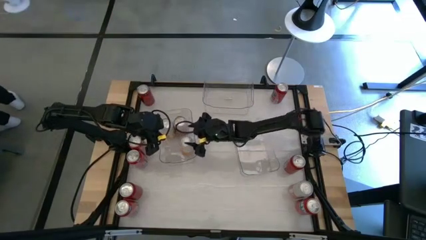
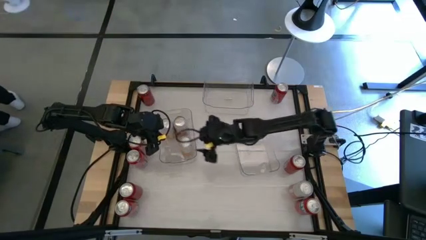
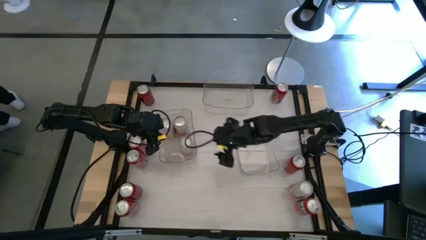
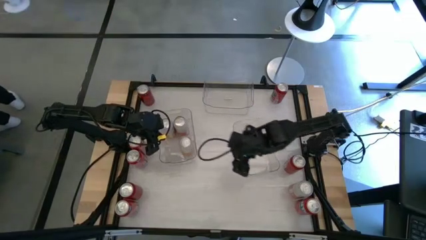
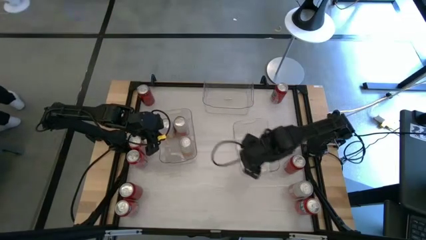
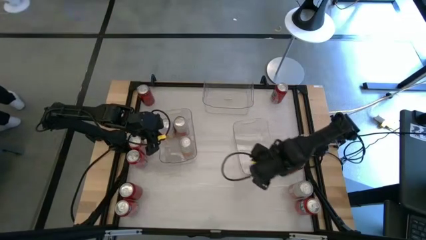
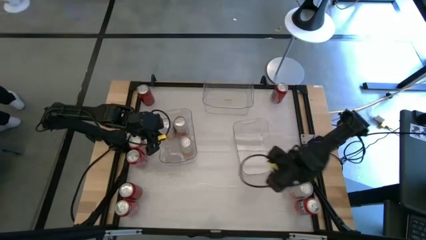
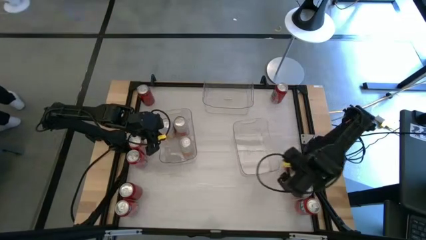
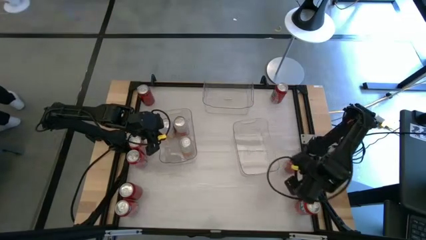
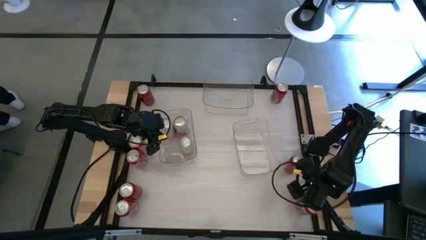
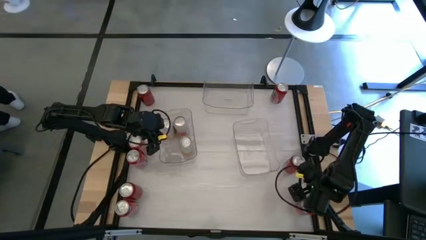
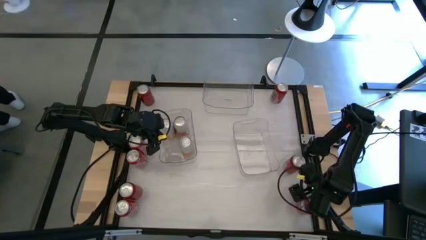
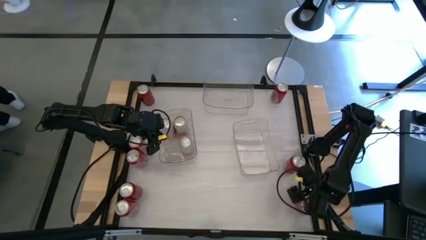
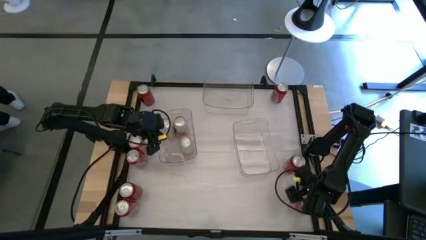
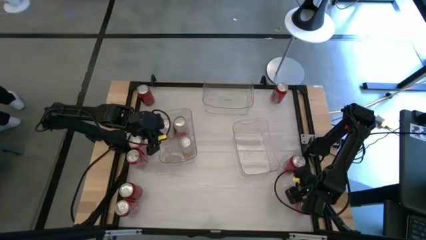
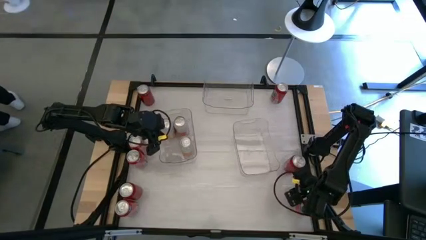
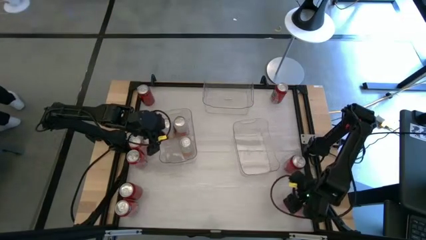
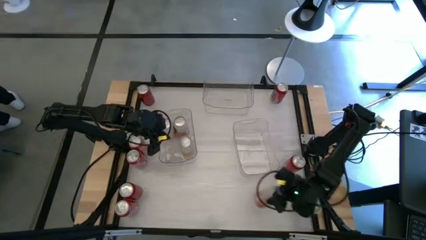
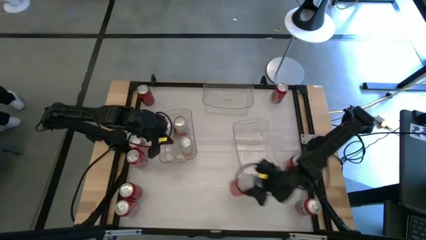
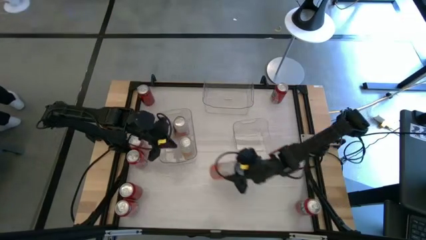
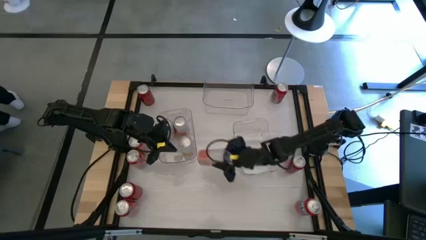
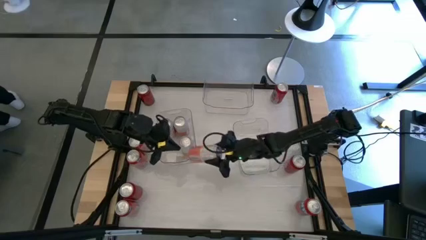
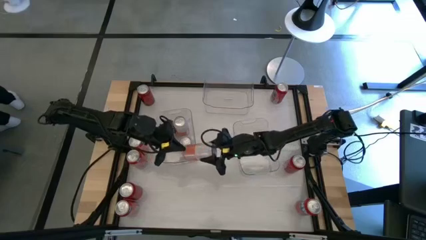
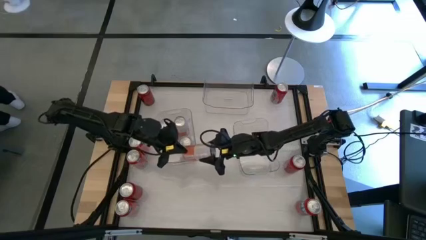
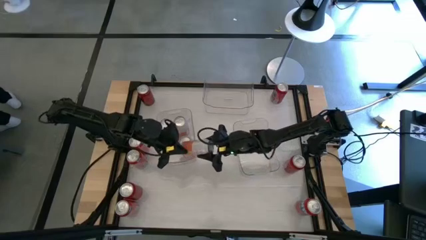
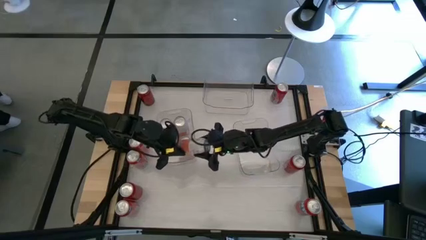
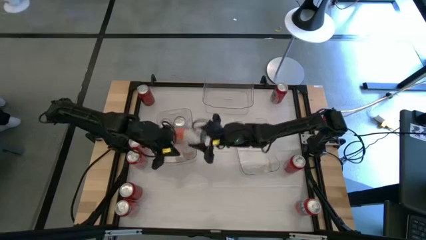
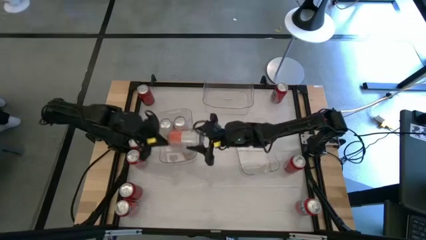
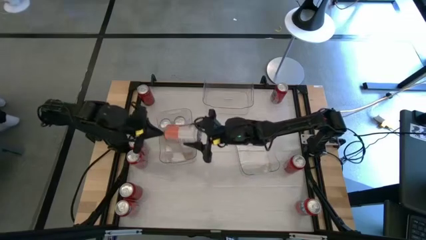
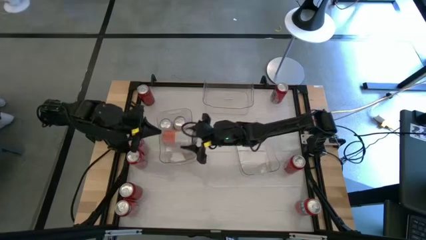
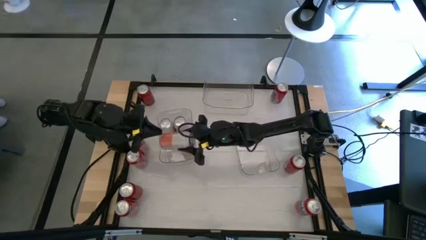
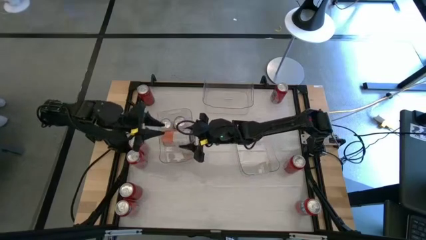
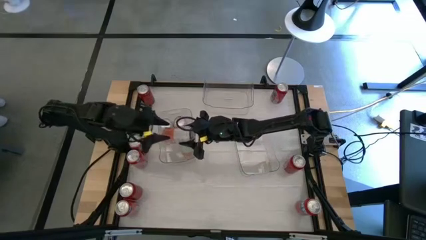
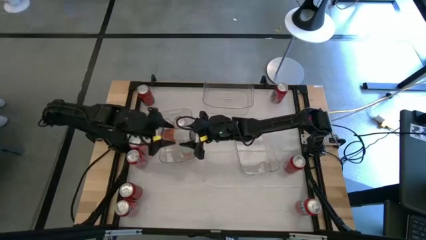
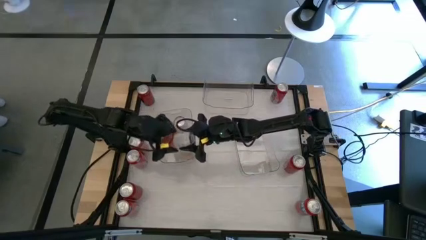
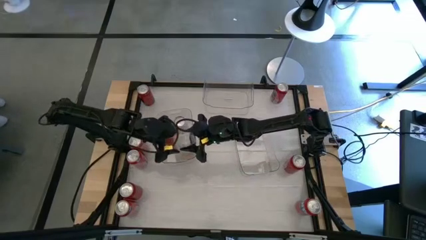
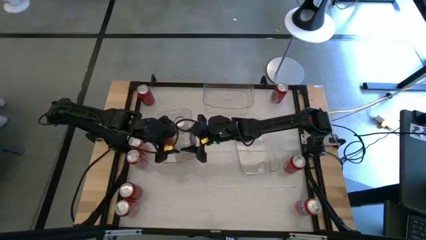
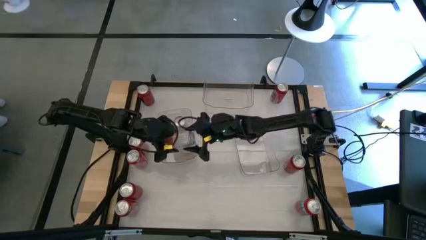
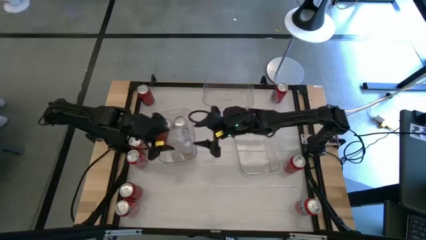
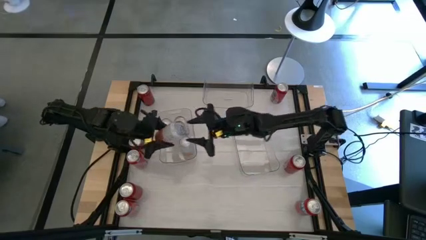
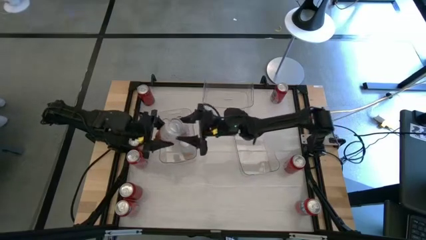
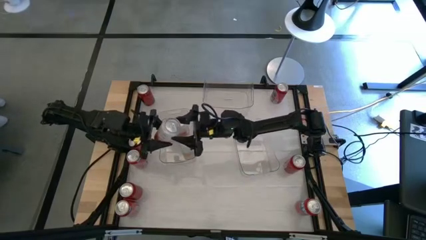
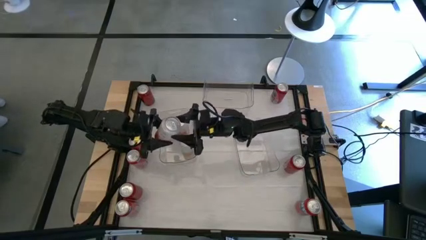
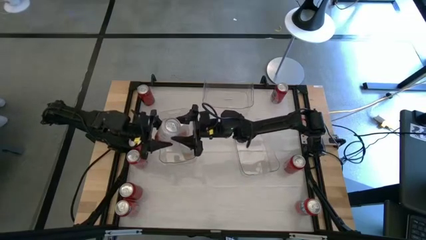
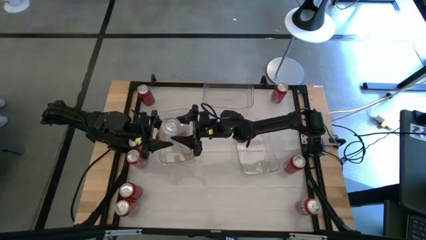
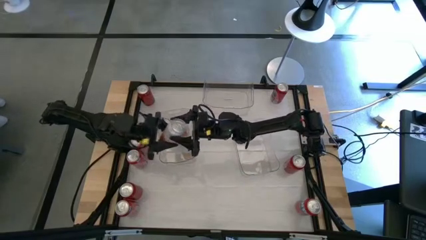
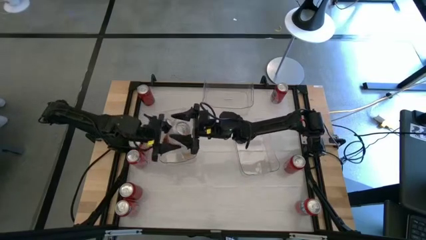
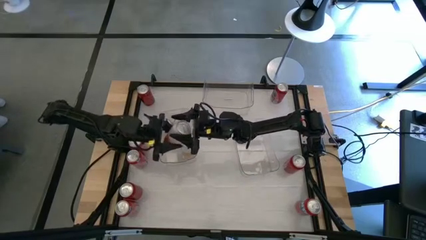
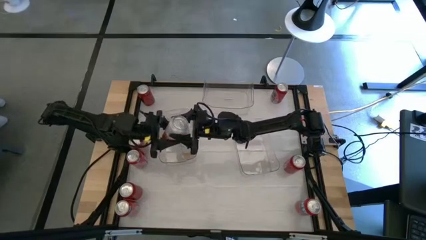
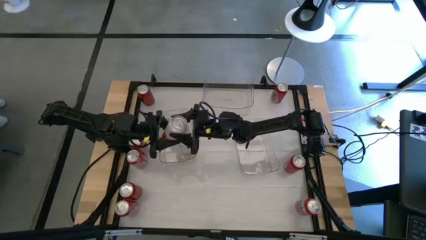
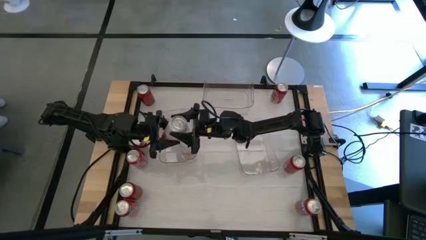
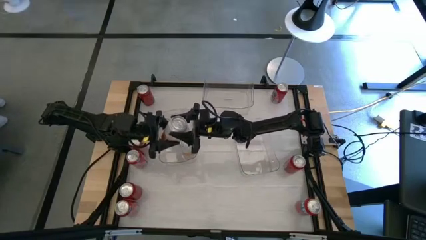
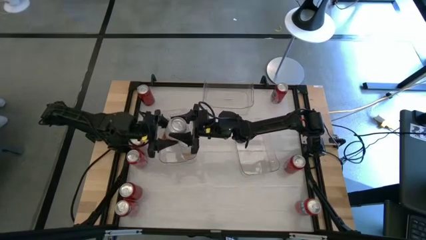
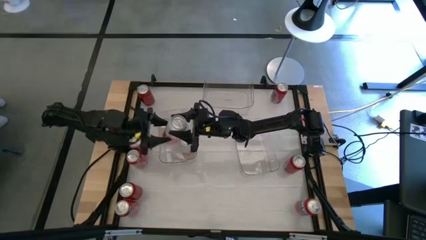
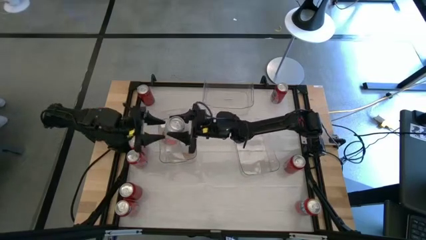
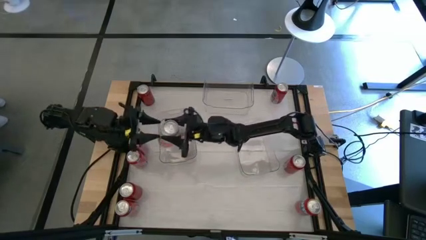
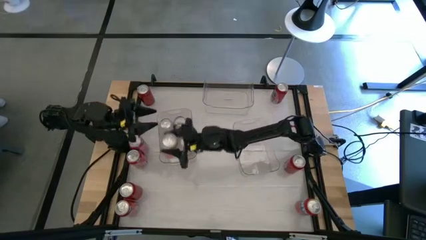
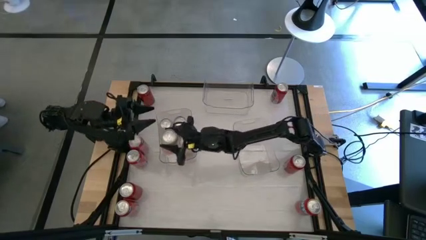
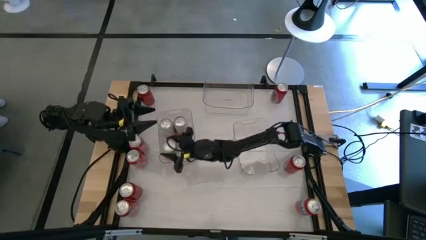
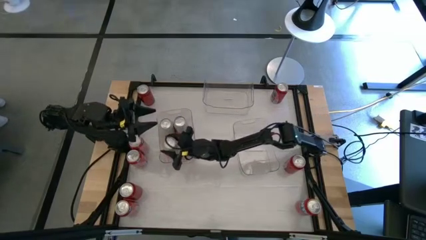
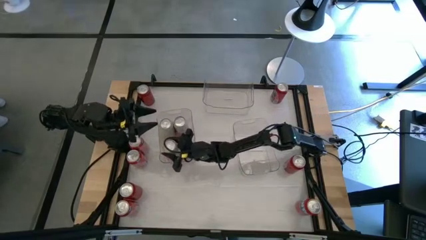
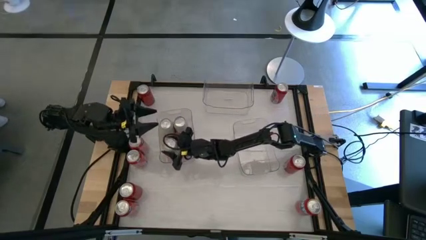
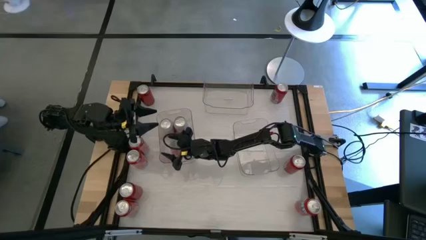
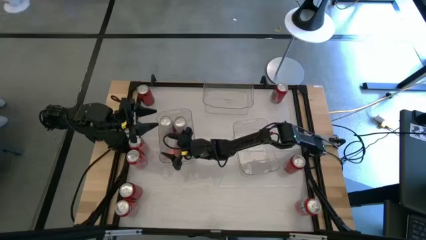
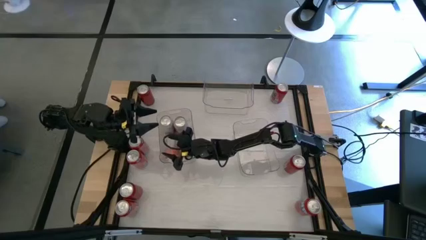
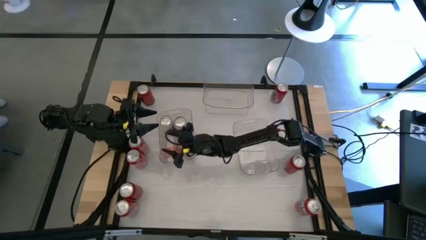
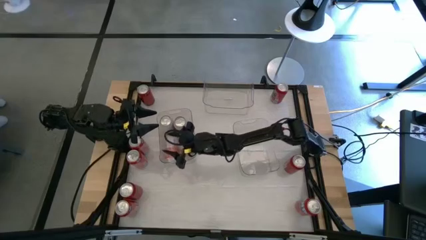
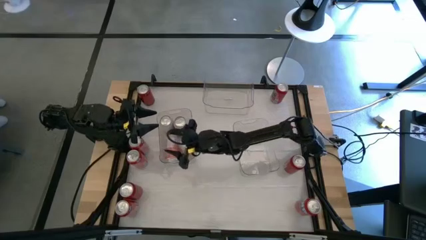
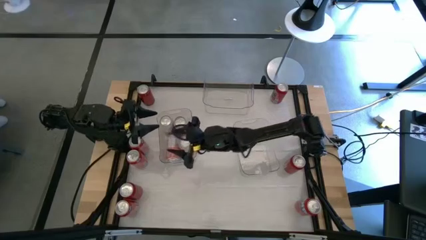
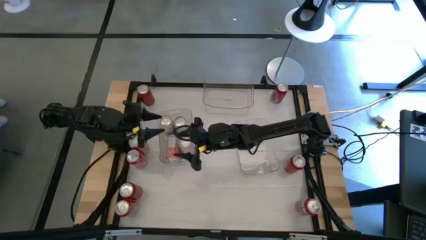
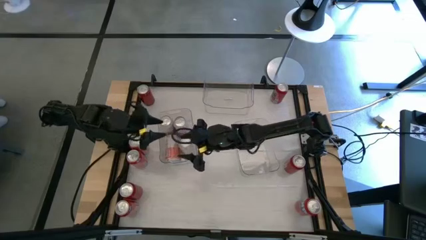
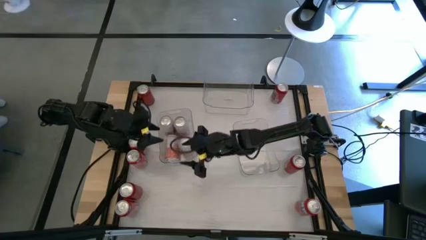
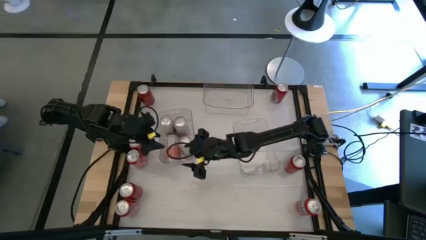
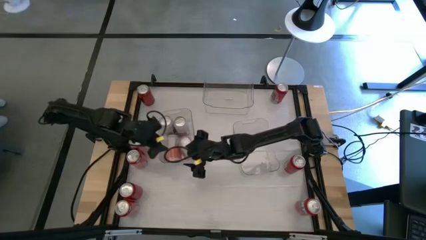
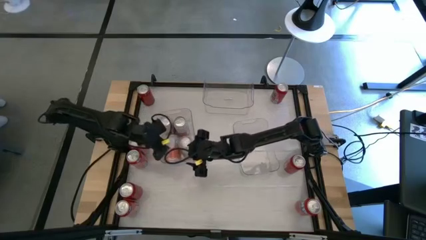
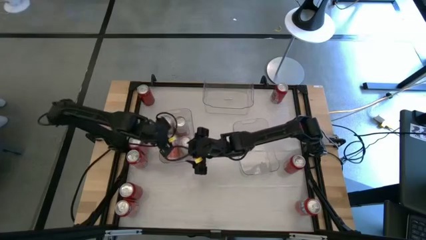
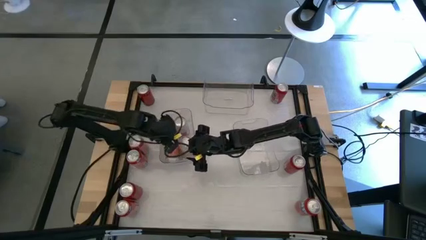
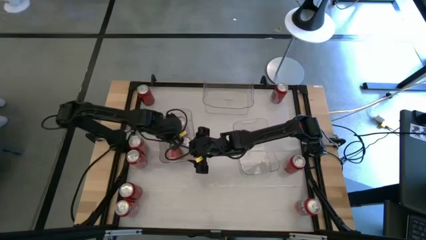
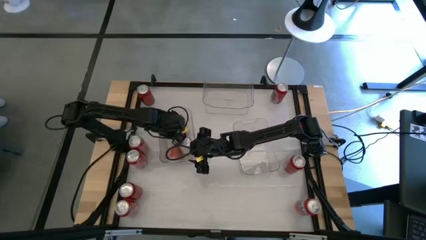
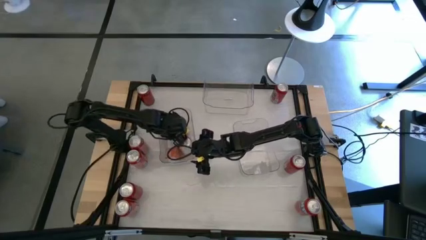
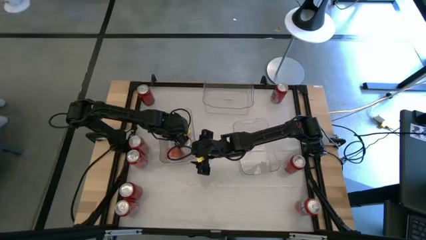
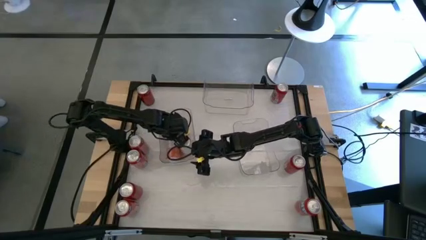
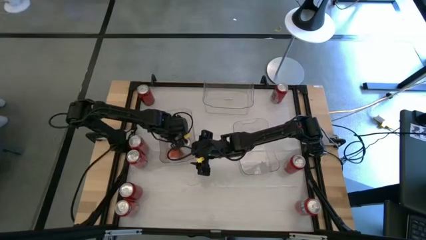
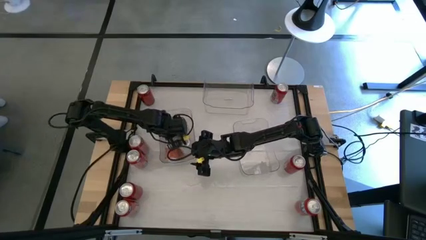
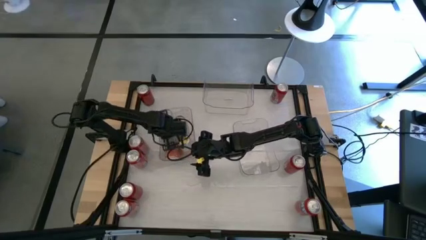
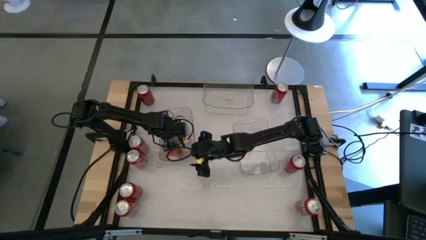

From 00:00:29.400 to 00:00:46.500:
Task: Sort soda cans
Put the orange white soda can into the left transparent bin
